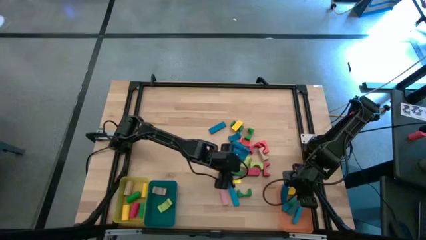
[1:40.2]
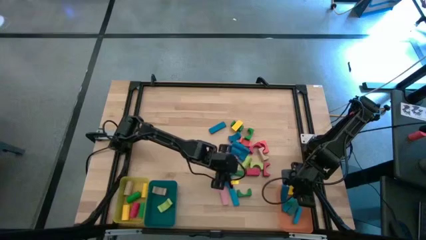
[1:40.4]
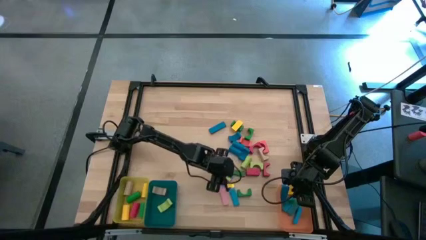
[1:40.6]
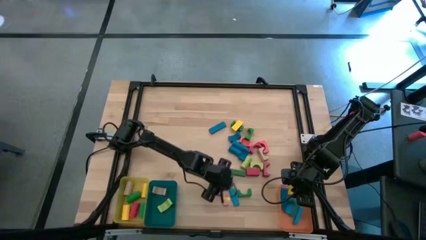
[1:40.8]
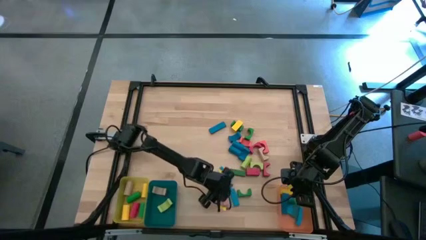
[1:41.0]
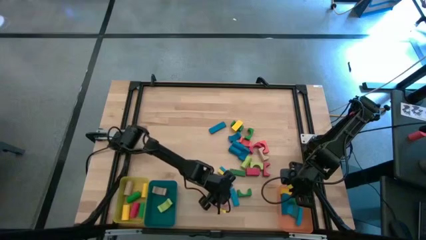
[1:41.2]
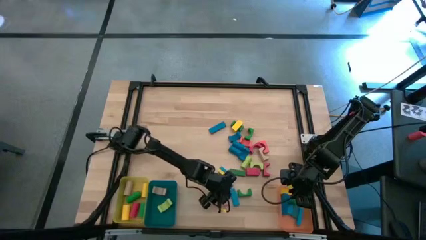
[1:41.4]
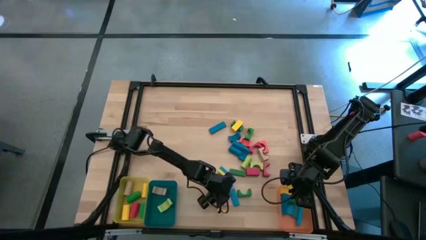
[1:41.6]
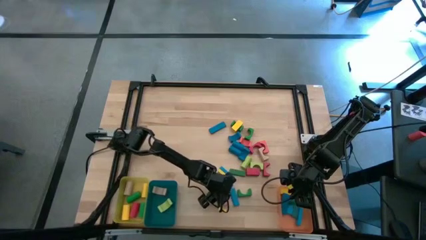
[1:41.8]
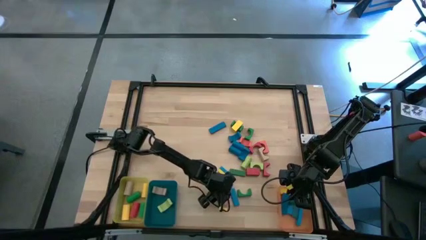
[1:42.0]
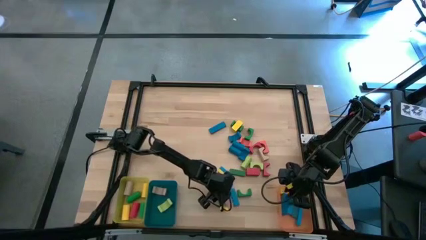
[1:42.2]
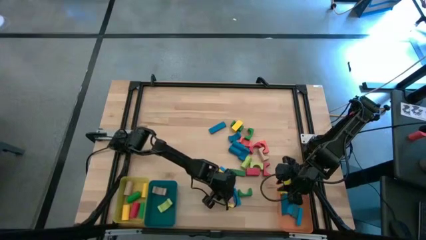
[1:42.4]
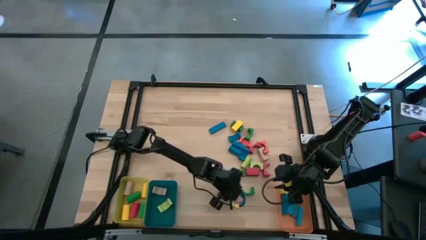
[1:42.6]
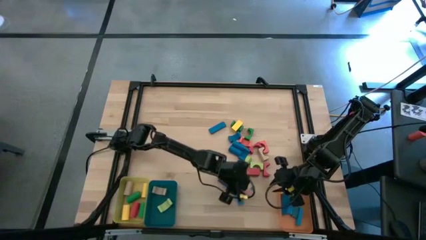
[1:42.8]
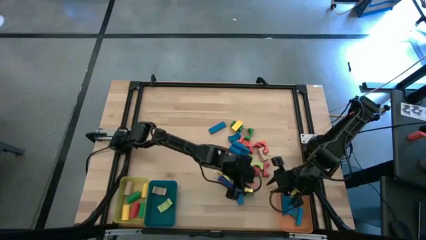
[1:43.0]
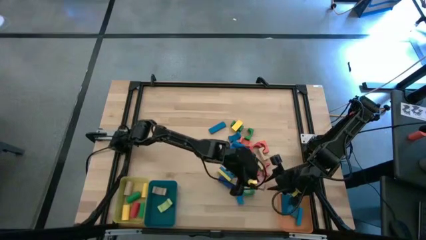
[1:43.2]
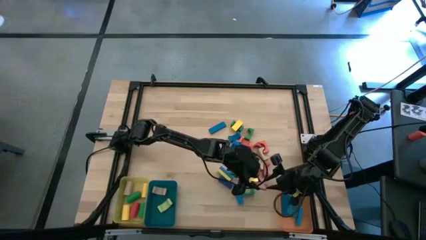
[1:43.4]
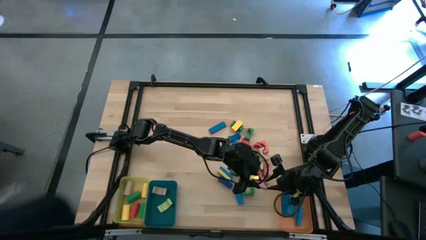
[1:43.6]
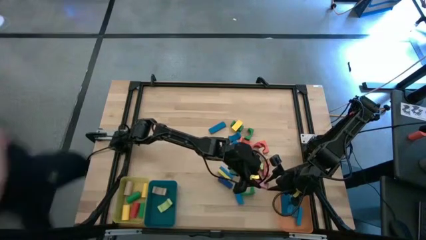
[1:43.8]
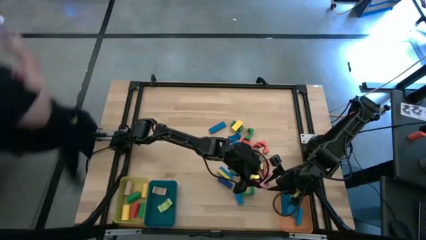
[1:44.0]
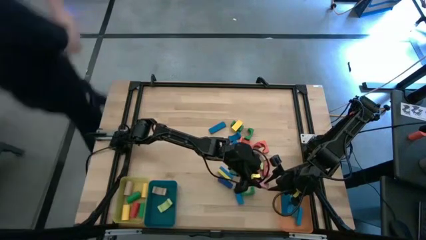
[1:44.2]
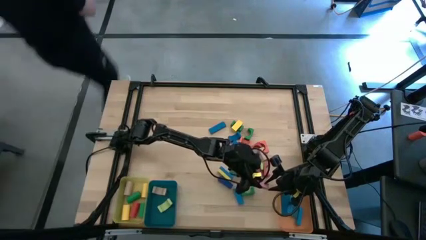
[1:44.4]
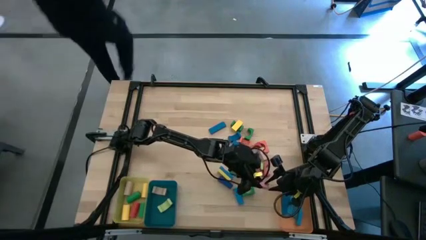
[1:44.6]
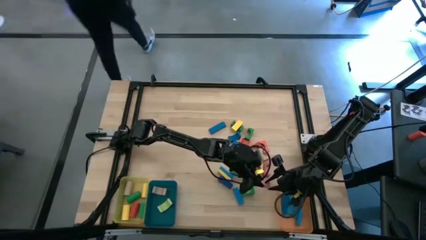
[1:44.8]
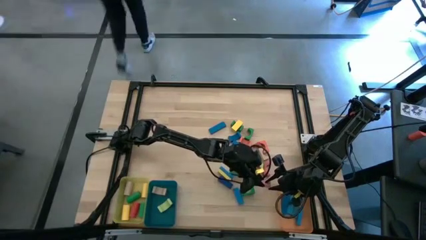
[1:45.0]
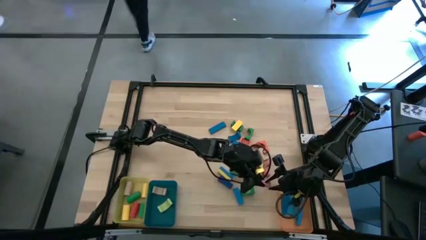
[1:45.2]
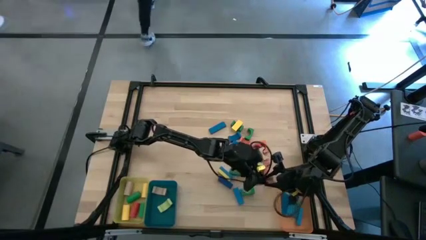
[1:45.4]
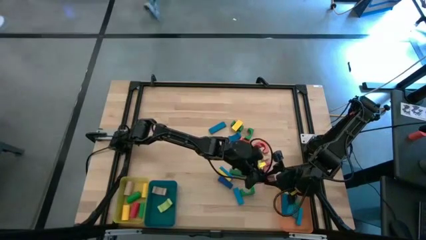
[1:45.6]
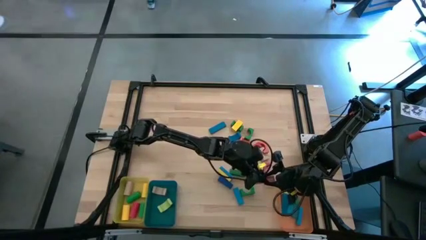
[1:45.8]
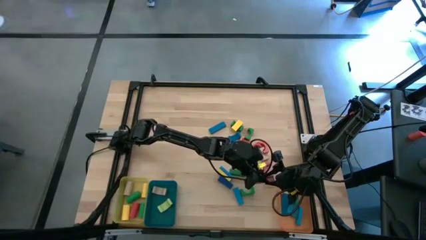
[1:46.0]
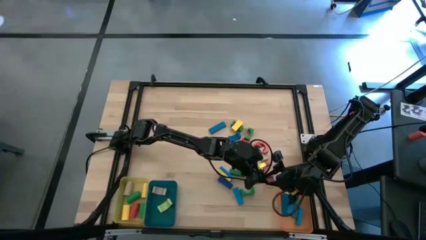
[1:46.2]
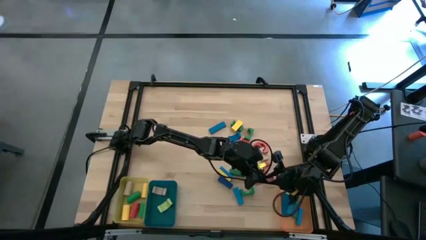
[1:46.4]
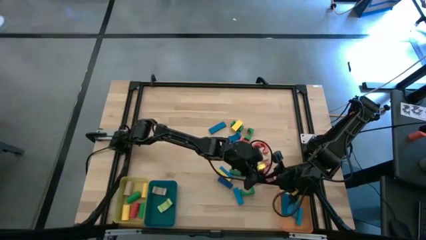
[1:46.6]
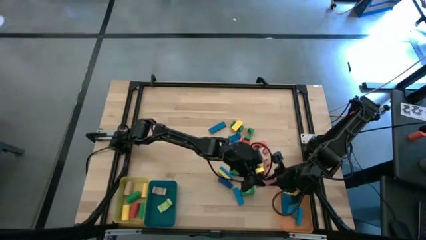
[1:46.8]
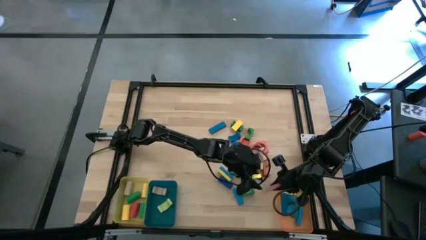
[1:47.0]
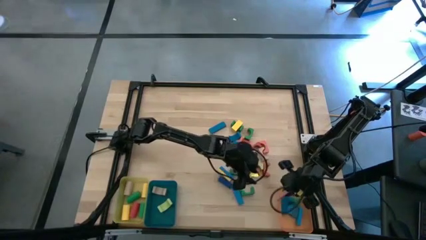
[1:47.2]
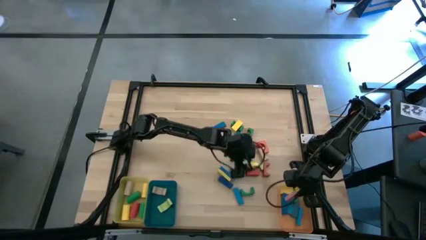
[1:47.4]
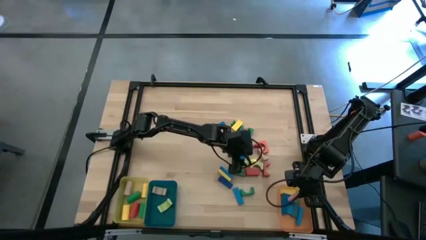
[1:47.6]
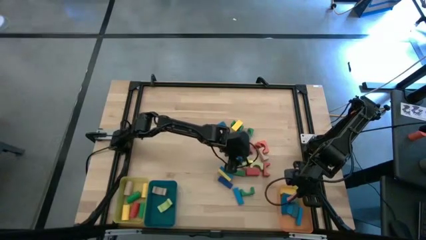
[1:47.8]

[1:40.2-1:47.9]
Task: Sort blocks by size
Put the pink rectangular block into the orange bin

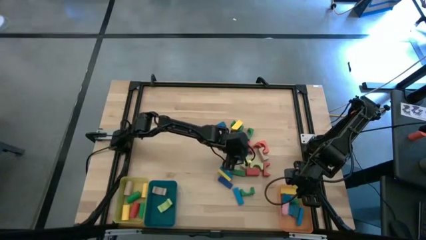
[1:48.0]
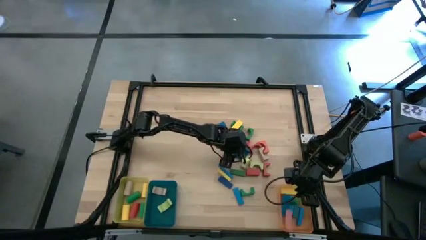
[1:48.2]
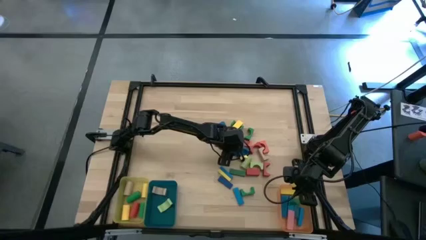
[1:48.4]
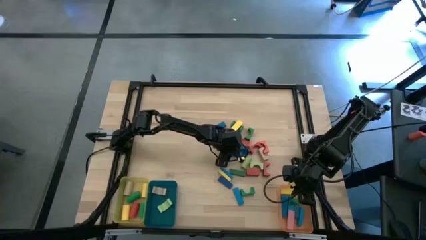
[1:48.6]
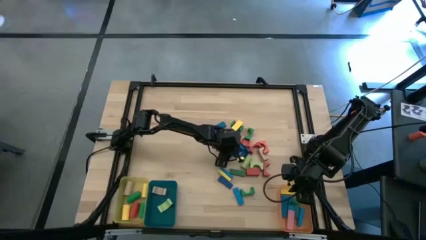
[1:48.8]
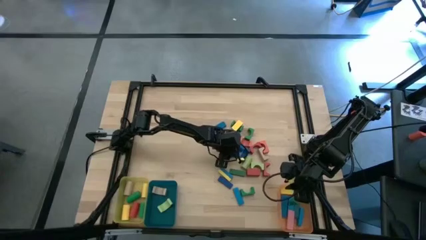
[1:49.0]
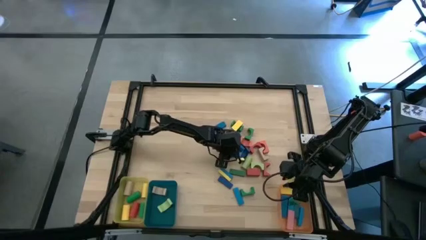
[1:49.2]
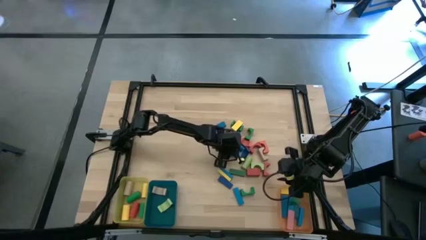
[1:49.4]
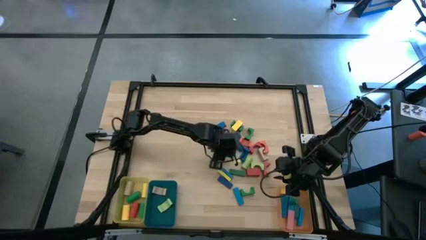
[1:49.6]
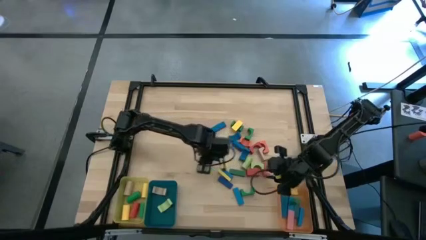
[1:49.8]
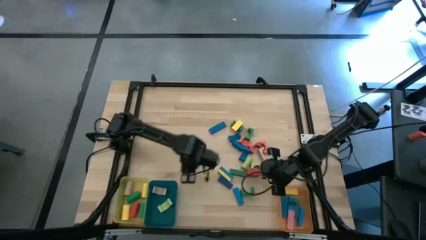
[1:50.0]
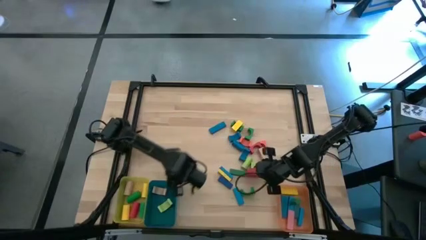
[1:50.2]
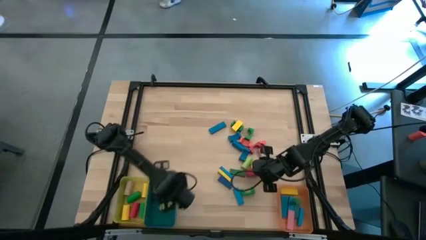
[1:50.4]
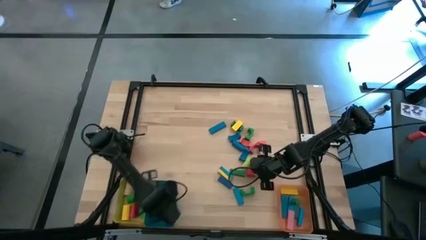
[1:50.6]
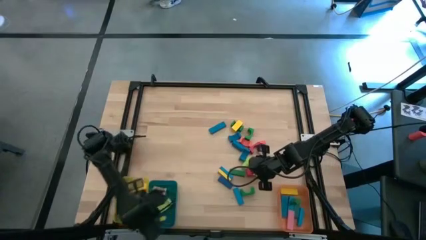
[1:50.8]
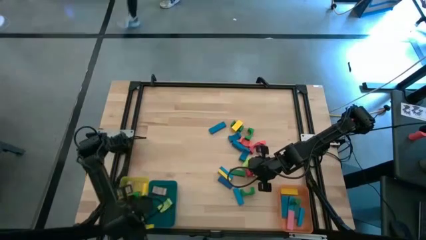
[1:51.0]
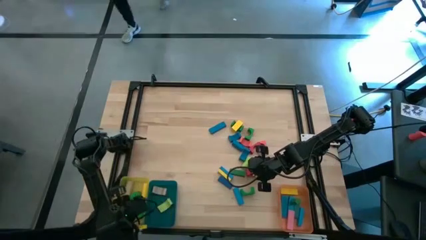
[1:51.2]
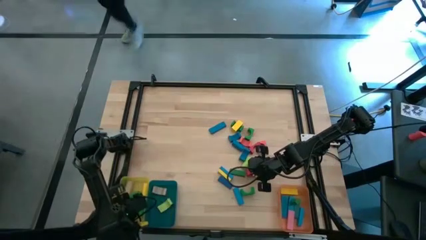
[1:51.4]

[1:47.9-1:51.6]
Put the blue cylindrical block into the yellow bin

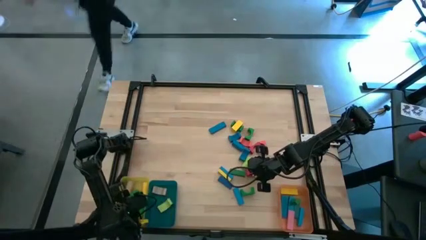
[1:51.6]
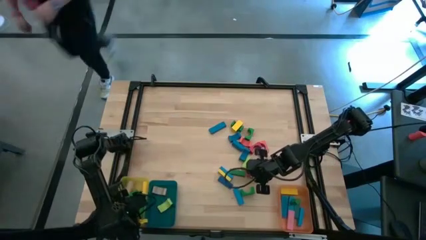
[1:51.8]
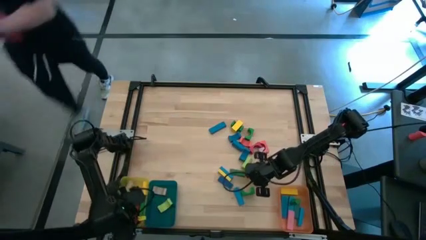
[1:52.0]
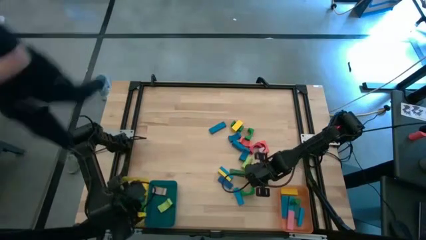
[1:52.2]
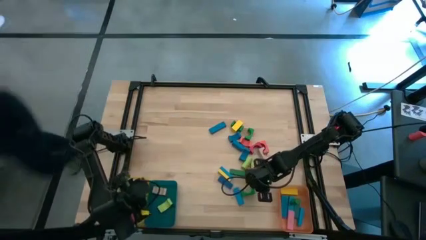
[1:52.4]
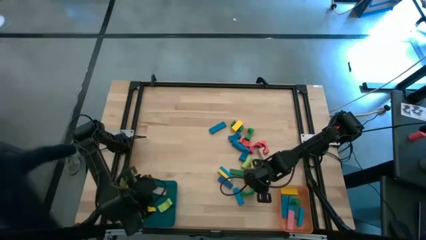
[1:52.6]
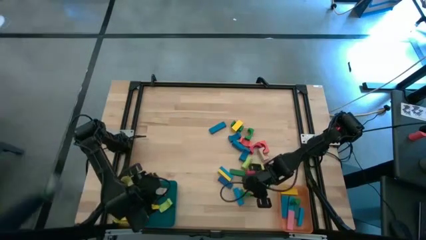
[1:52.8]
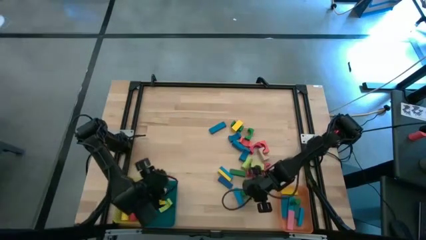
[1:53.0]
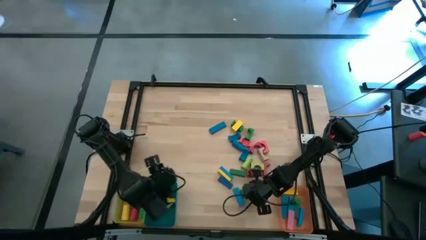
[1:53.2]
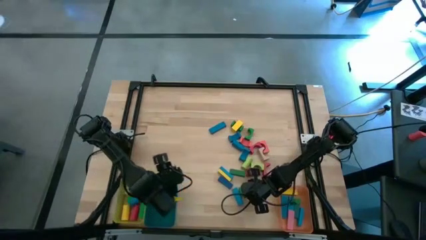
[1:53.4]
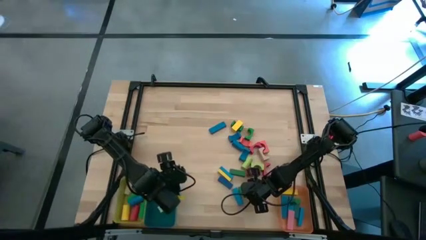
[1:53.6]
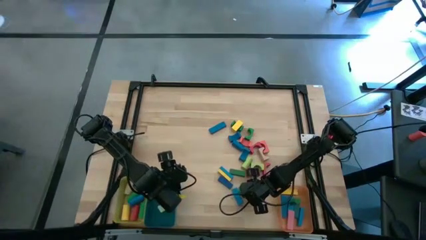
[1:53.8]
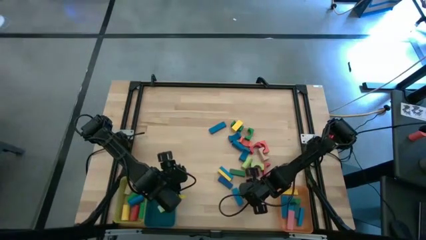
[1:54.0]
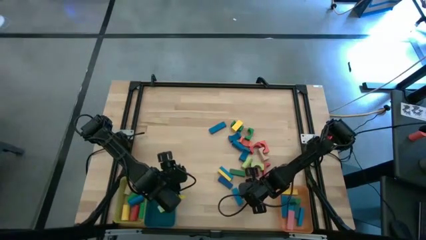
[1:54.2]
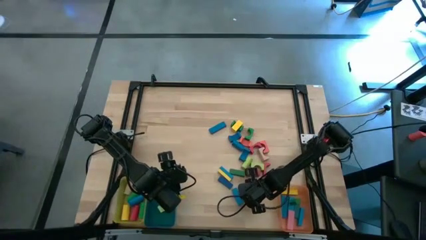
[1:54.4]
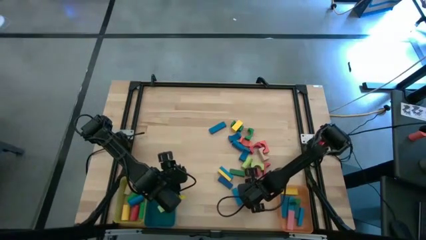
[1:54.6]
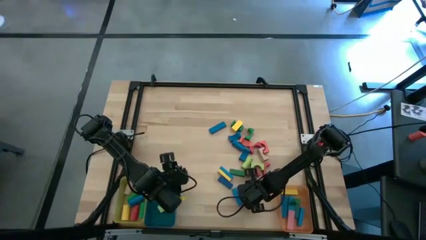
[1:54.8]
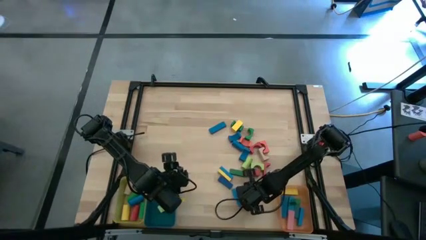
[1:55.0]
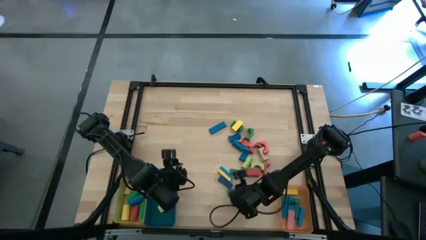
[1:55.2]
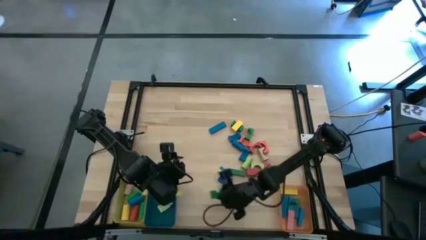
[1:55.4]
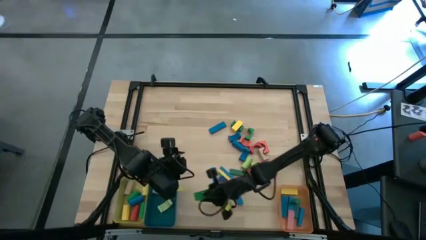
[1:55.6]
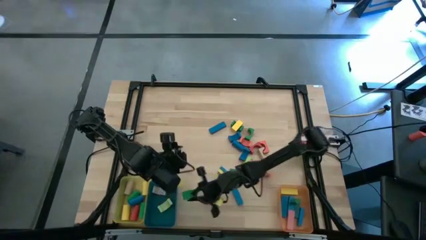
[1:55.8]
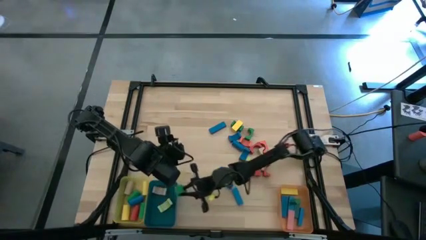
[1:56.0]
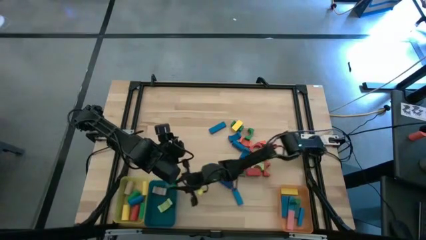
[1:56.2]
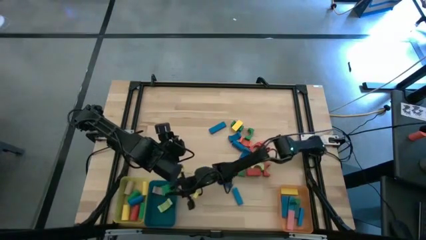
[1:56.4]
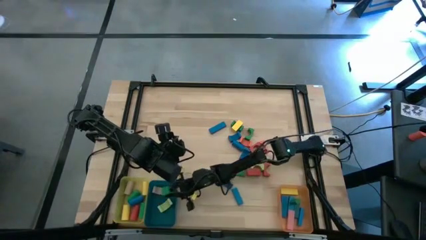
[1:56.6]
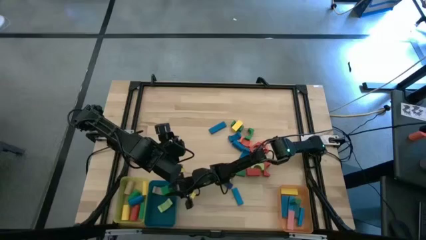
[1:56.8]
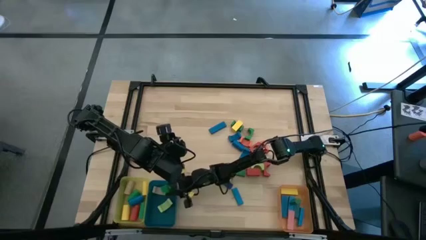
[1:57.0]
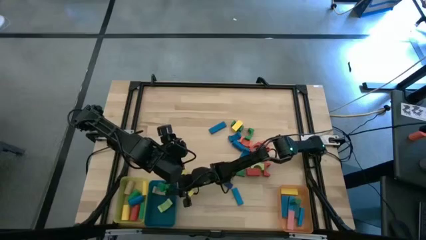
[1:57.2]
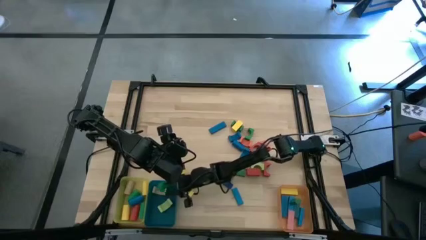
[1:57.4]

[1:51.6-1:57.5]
Put the green arch block into the blue bin
